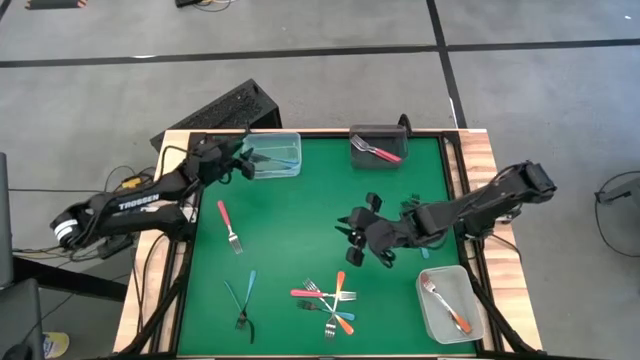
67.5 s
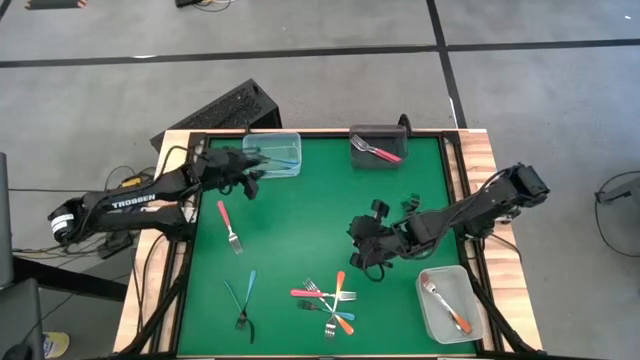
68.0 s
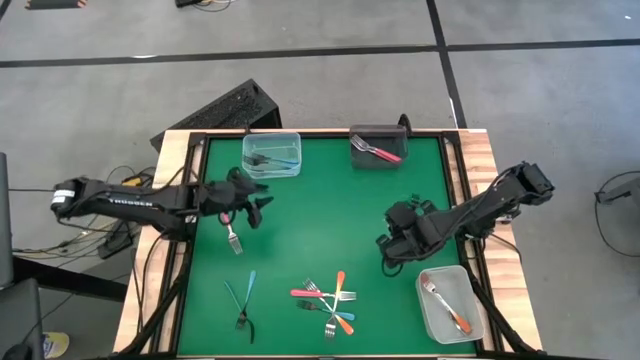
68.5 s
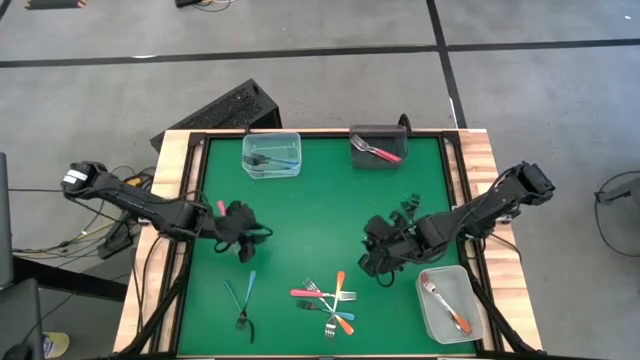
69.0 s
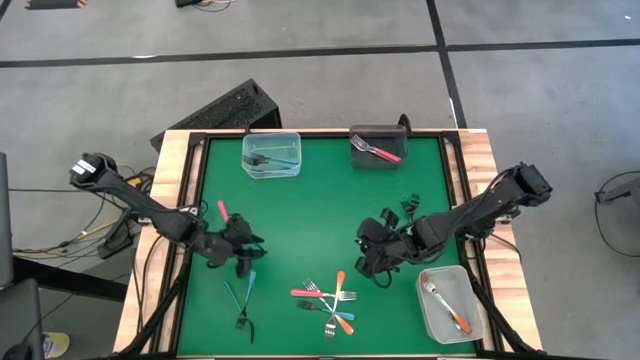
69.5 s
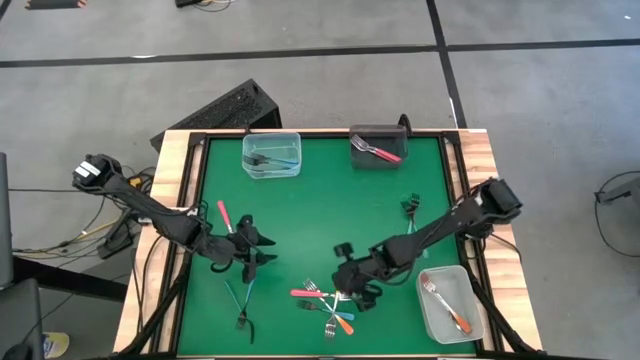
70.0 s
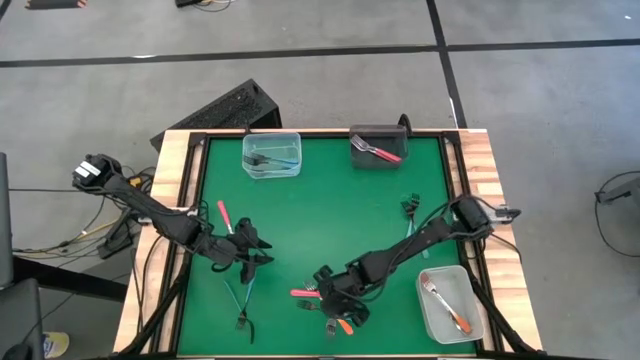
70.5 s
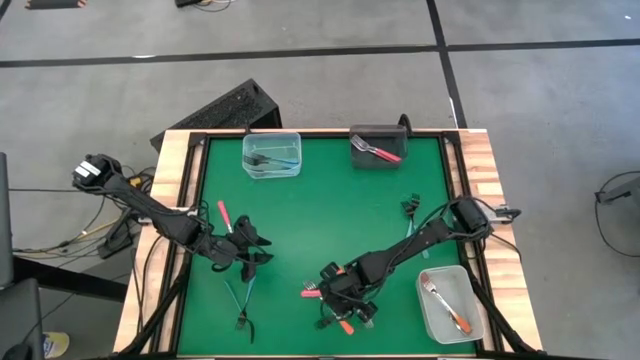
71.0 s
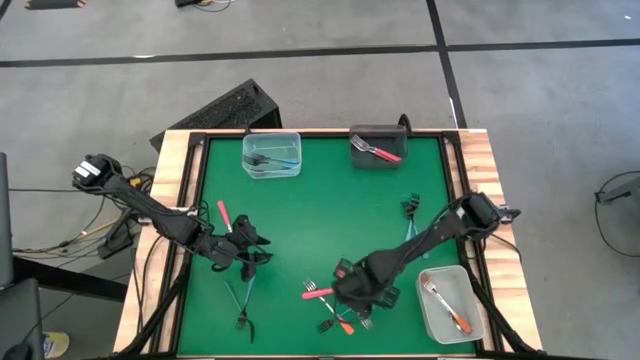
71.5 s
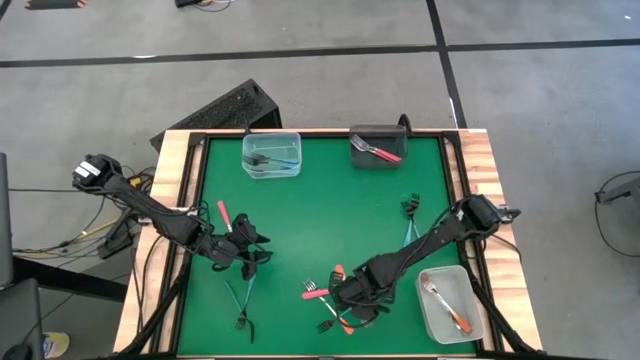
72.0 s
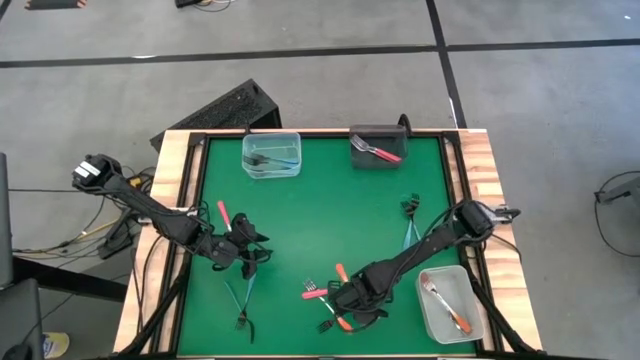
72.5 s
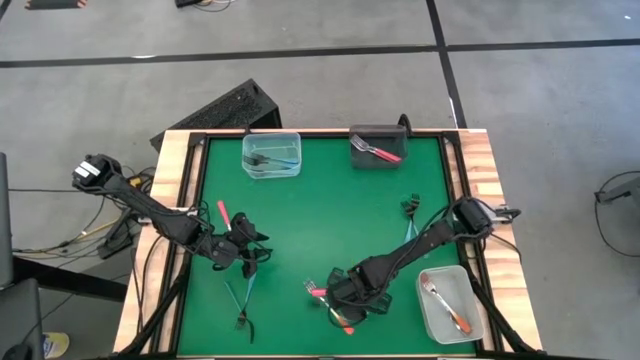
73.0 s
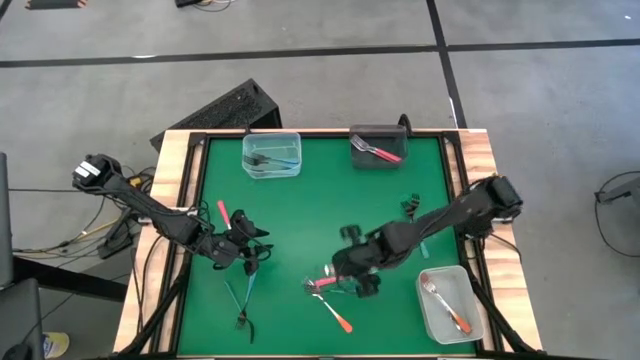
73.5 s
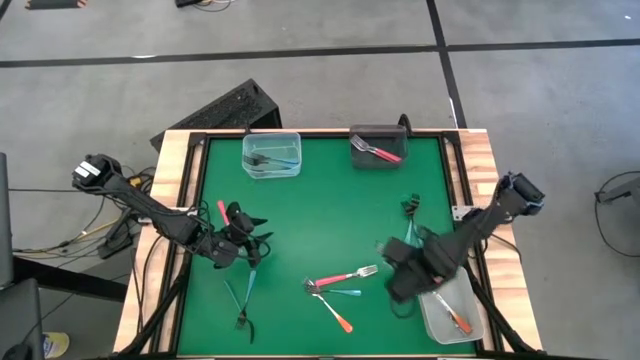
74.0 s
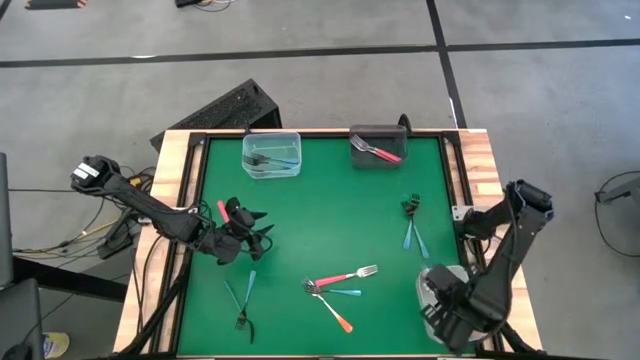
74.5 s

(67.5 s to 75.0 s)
Task: Sort silverware by color (type)
Put the orange fork into the white bin

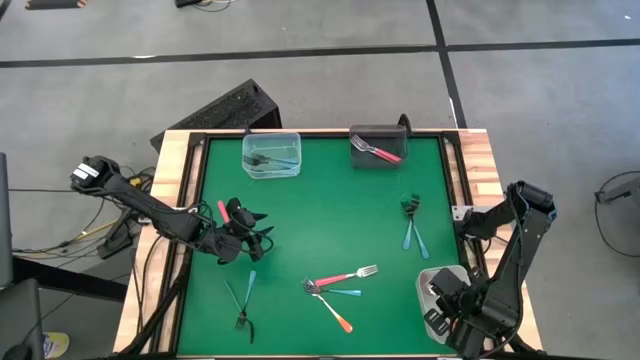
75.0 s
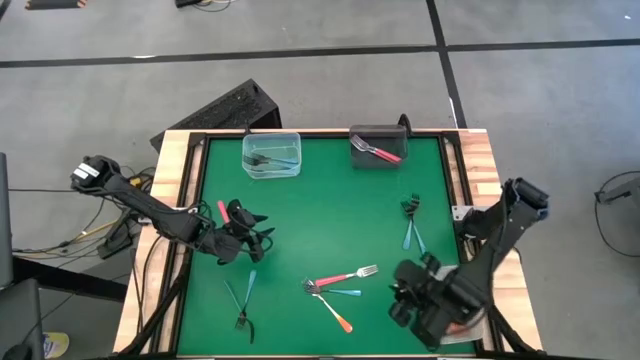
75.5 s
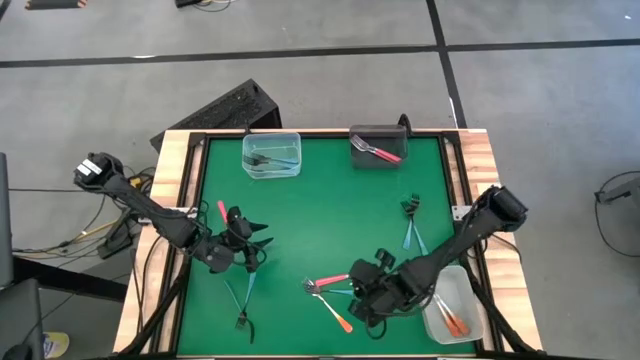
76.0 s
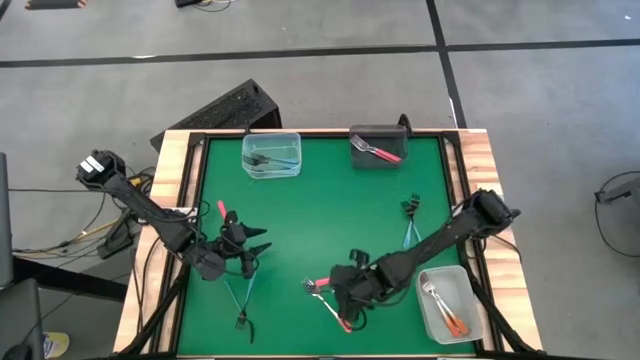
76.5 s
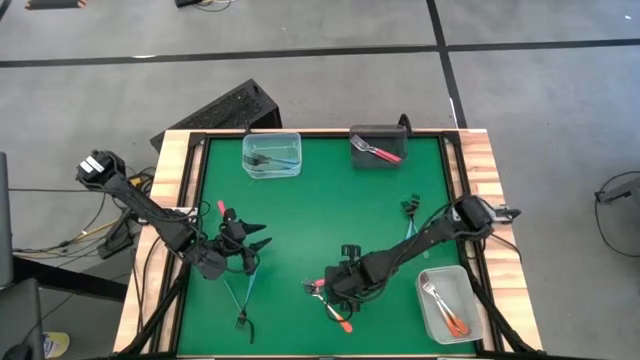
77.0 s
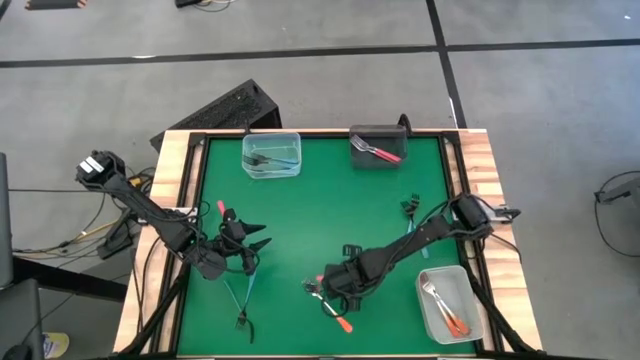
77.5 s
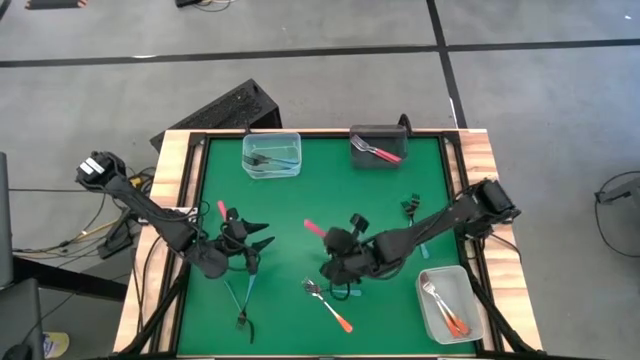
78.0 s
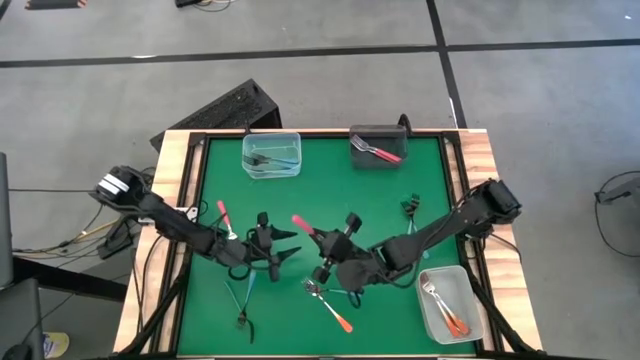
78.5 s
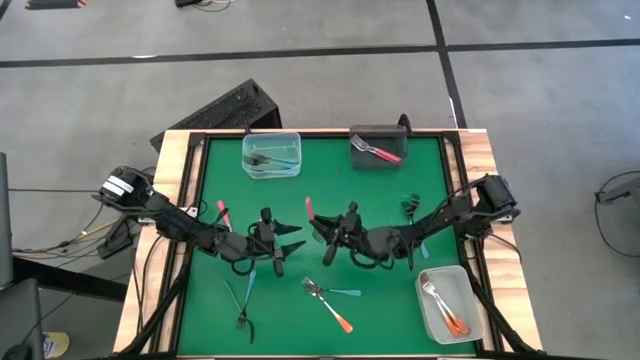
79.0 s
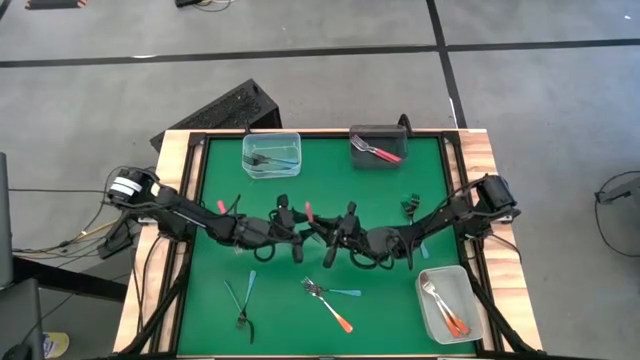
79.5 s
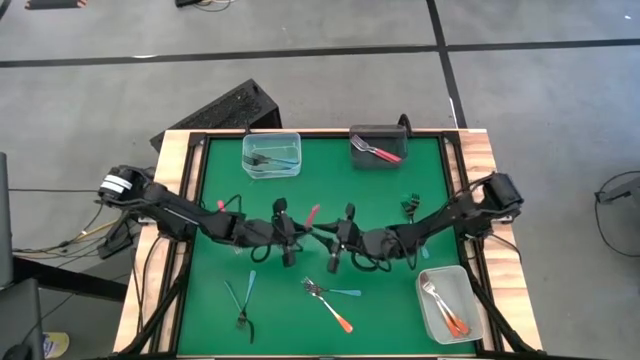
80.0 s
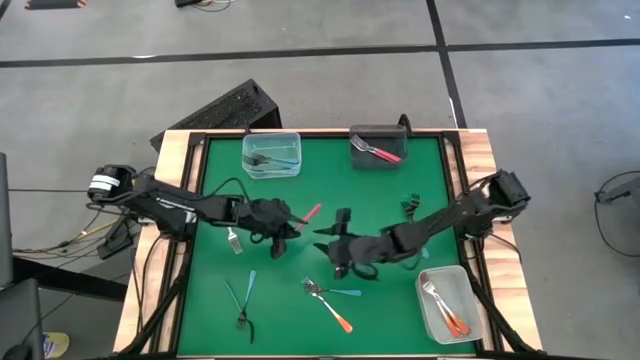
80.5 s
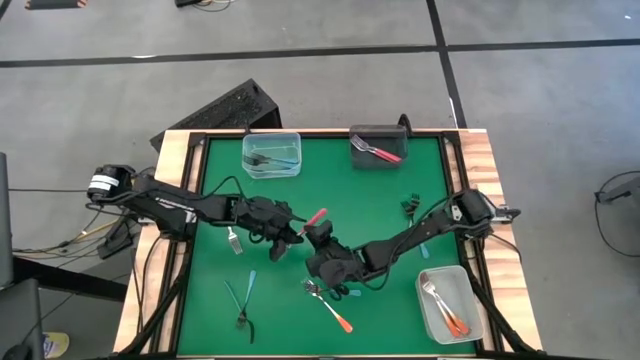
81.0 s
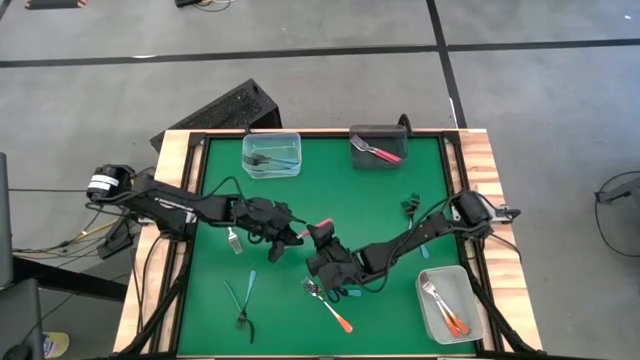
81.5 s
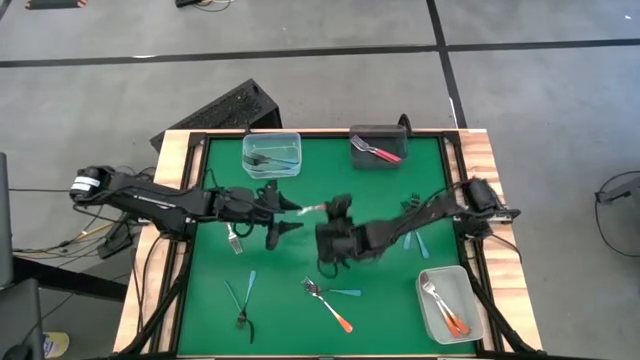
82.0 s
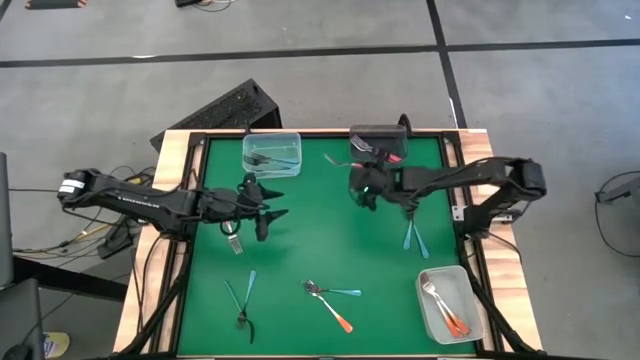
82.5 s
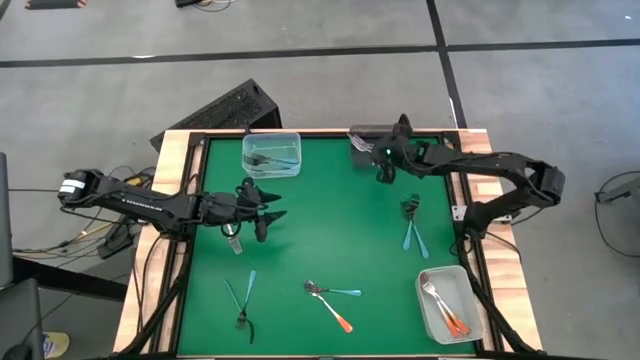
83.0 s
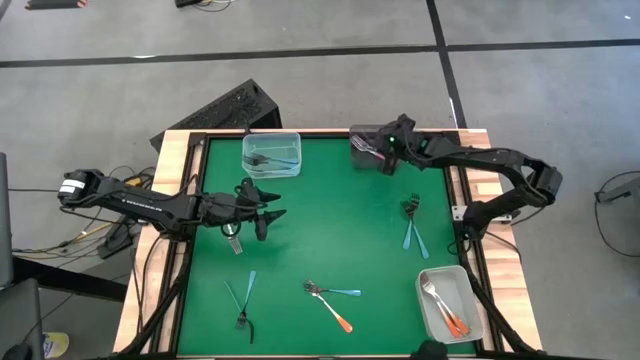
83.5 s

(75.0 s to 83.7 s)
Put the pink fork into the black bin

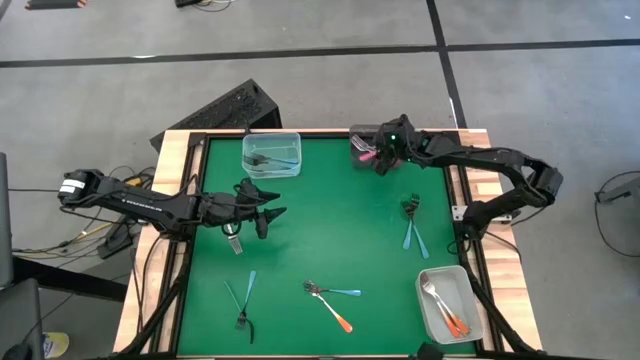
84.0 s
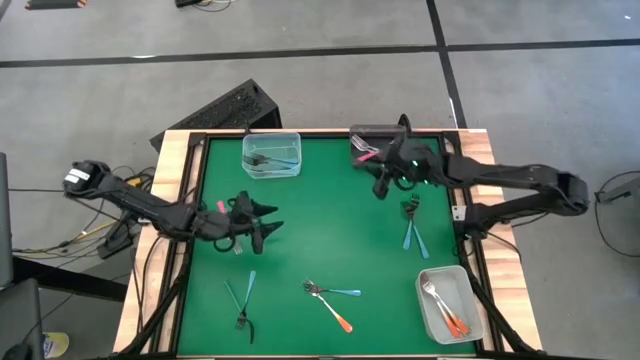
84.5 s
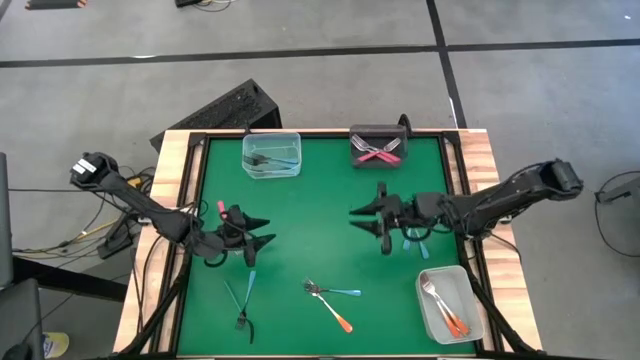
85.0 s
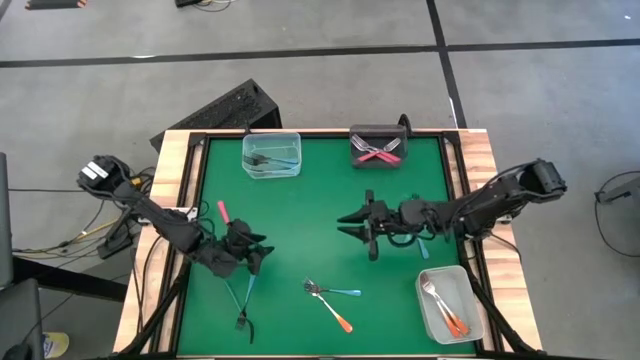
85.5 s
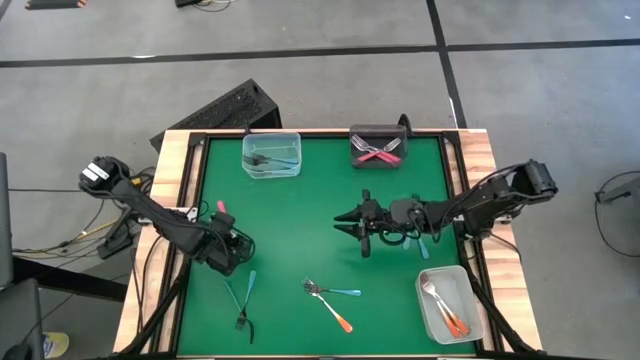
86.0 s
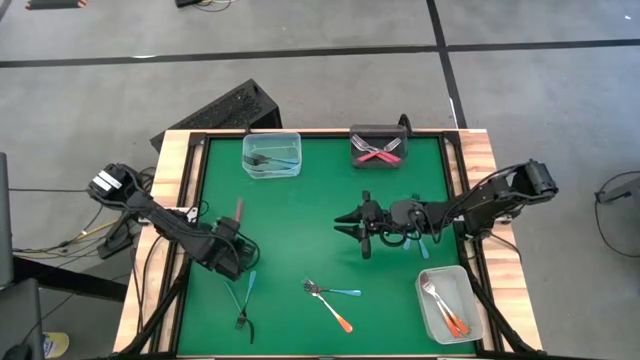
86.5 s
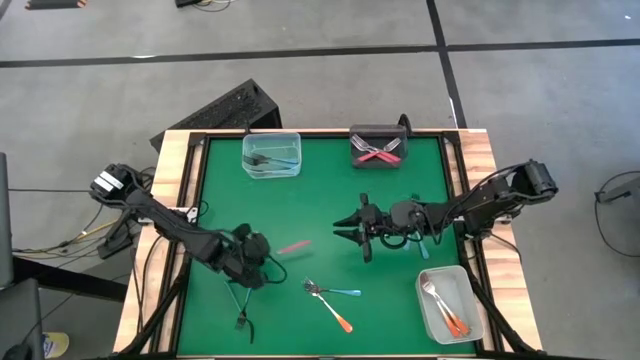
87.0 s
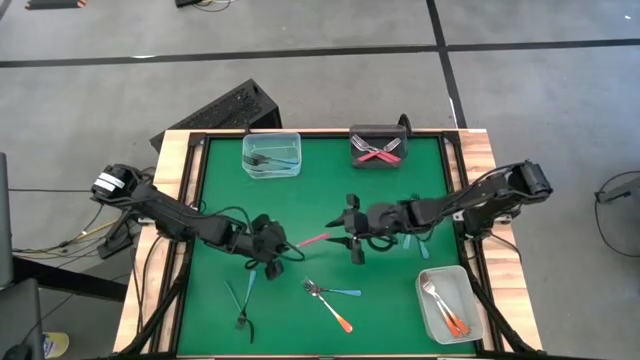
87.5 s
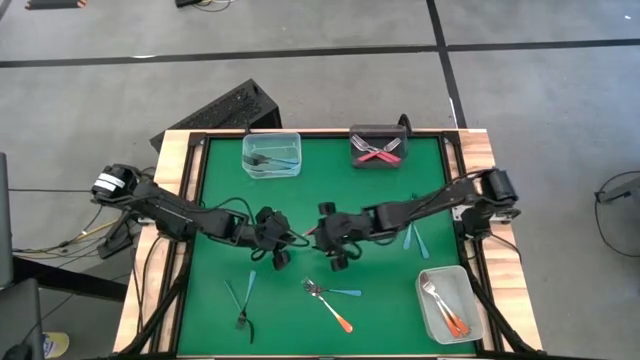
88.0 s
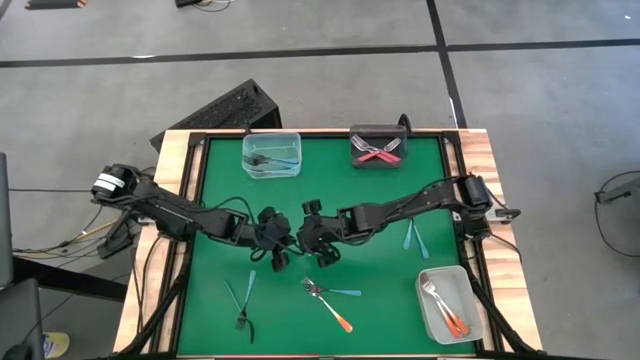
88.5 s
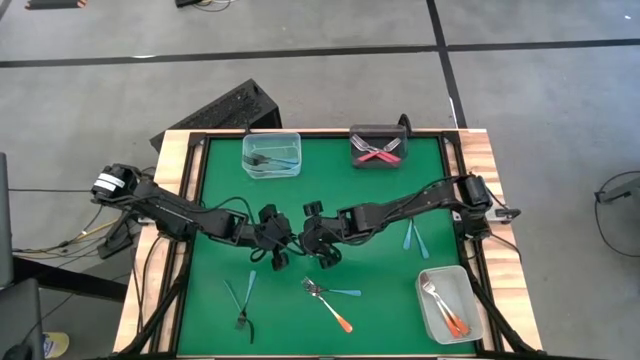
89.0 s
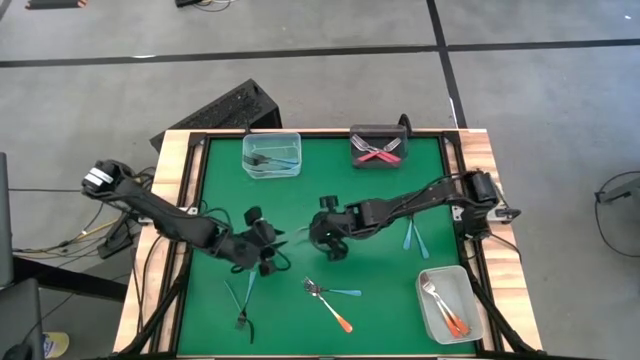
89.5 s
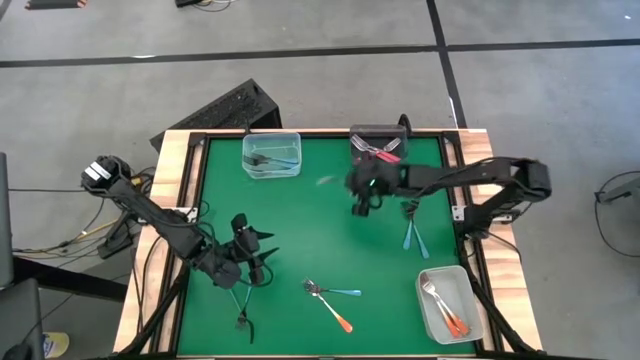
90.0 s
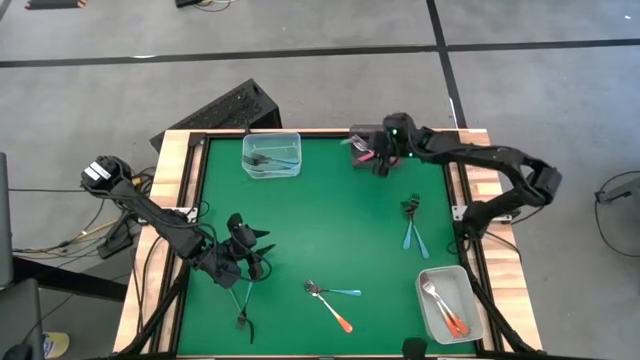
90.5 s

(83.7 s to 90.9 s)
Put the pink fork into the black bin
